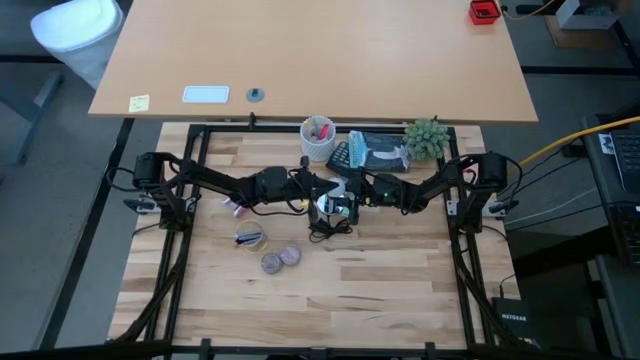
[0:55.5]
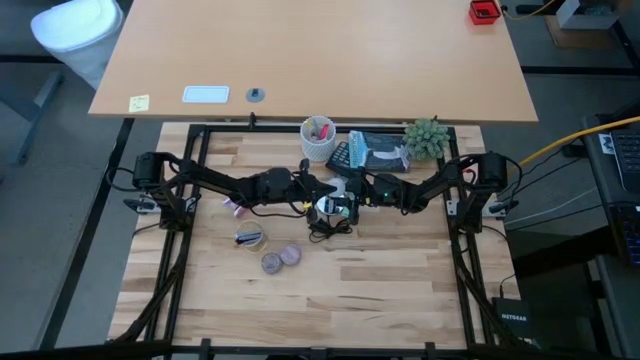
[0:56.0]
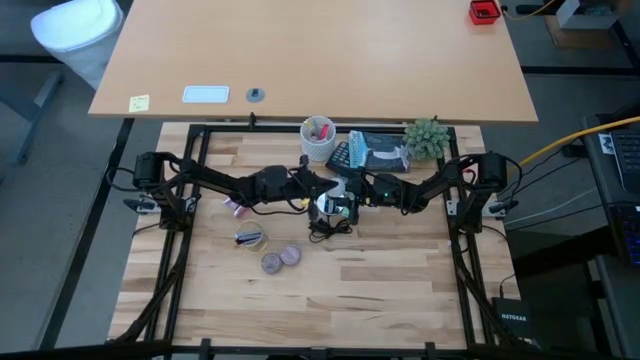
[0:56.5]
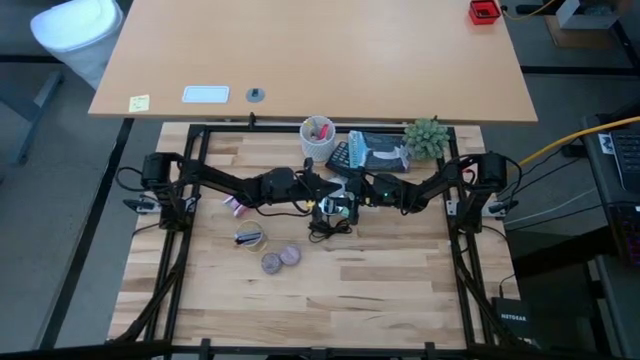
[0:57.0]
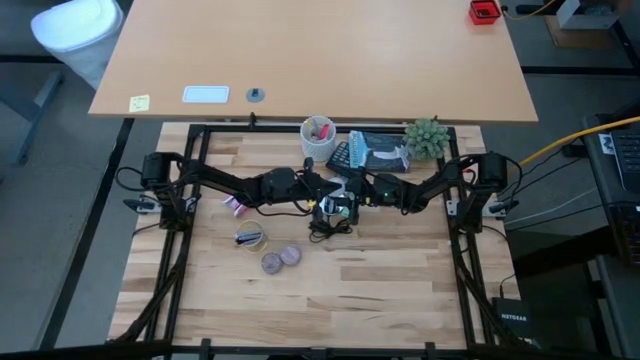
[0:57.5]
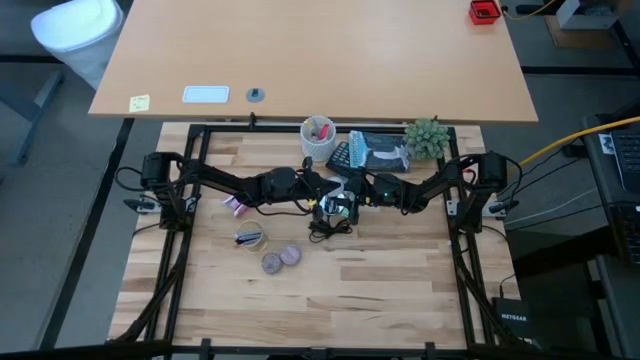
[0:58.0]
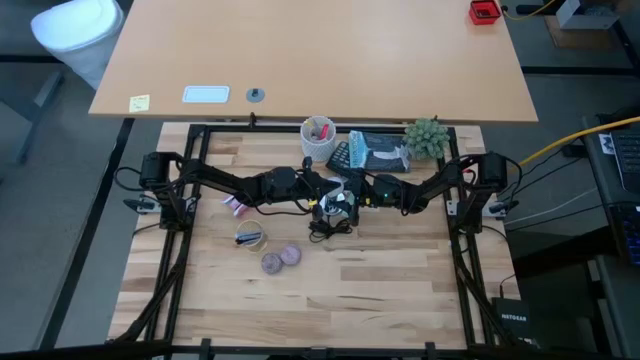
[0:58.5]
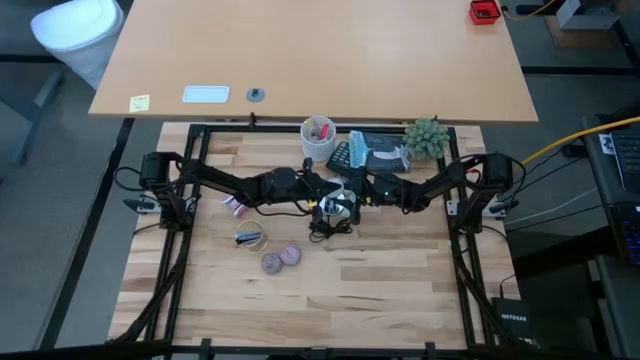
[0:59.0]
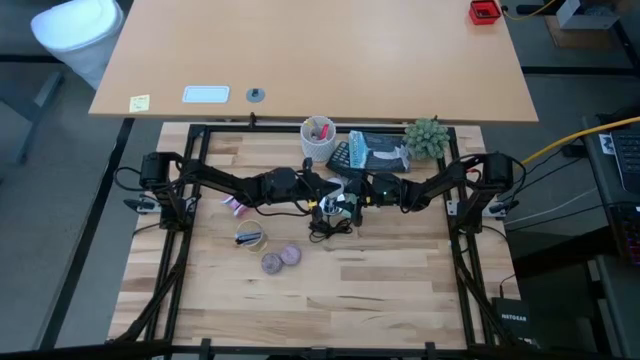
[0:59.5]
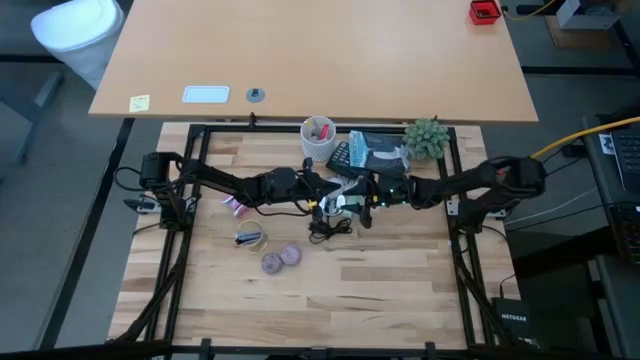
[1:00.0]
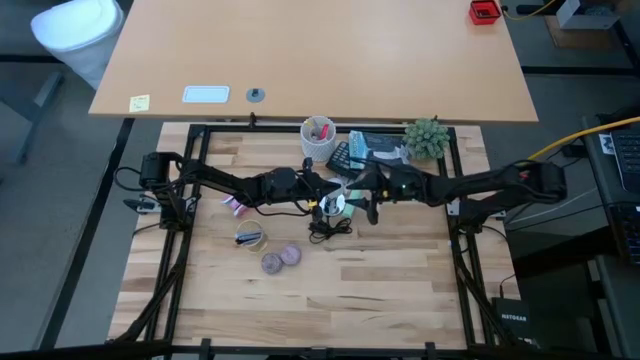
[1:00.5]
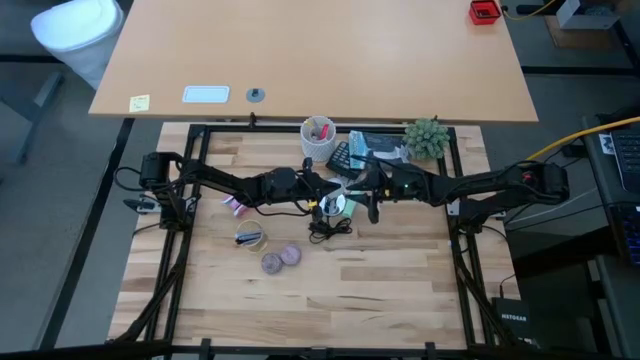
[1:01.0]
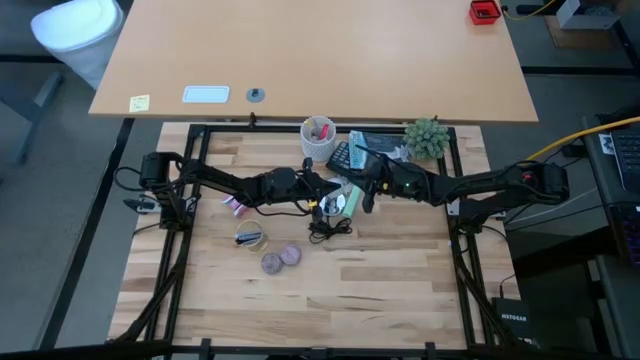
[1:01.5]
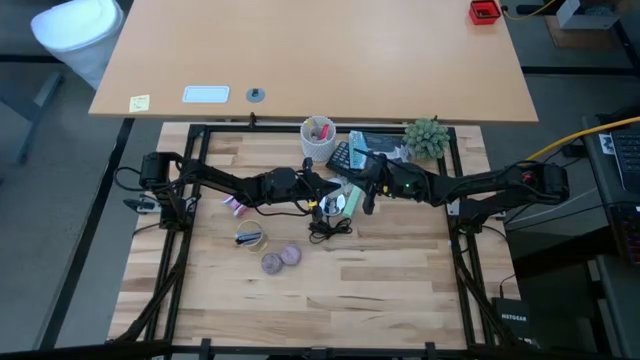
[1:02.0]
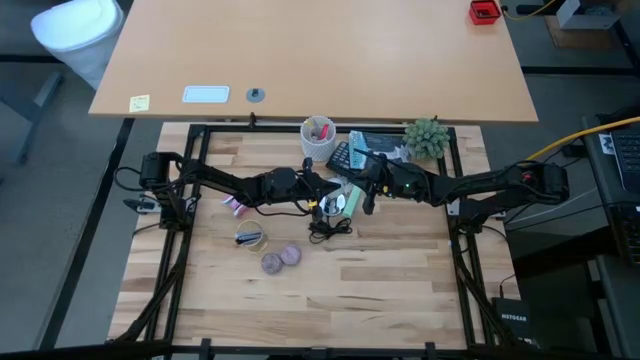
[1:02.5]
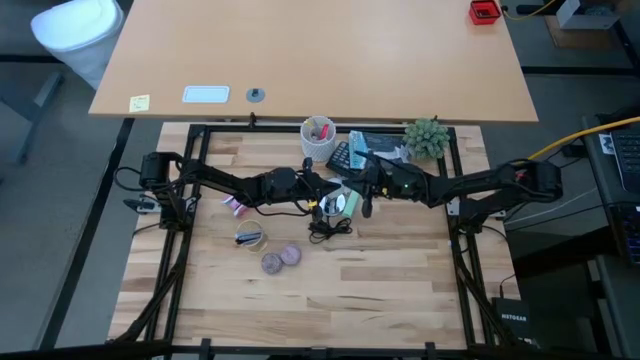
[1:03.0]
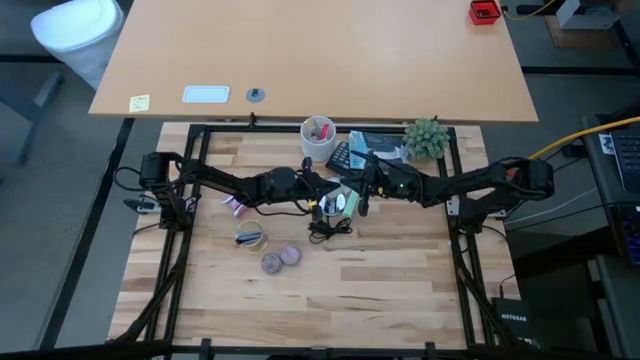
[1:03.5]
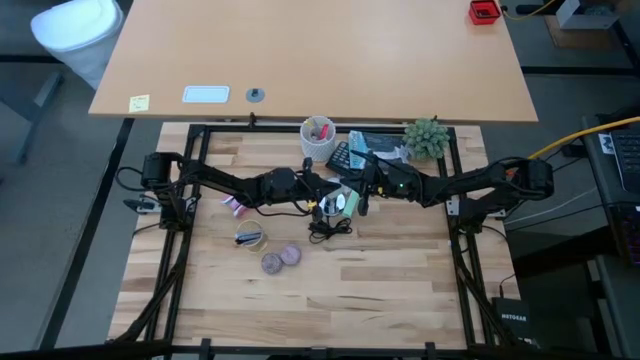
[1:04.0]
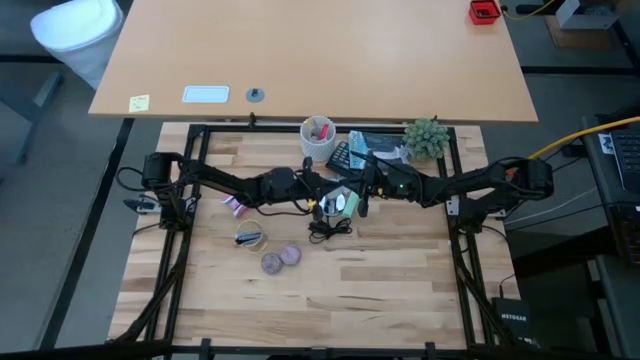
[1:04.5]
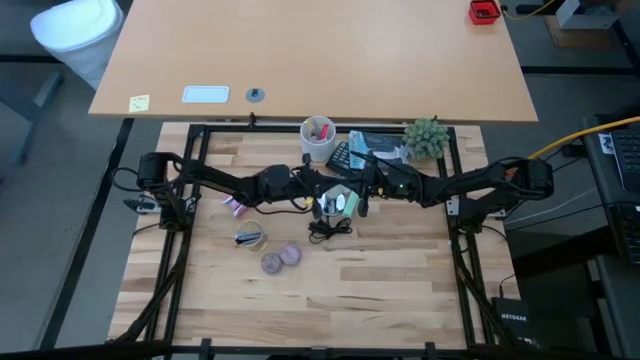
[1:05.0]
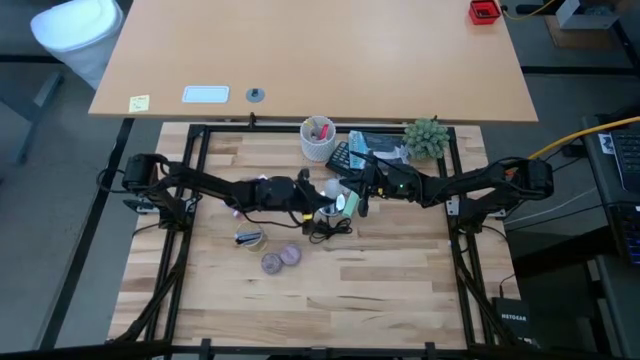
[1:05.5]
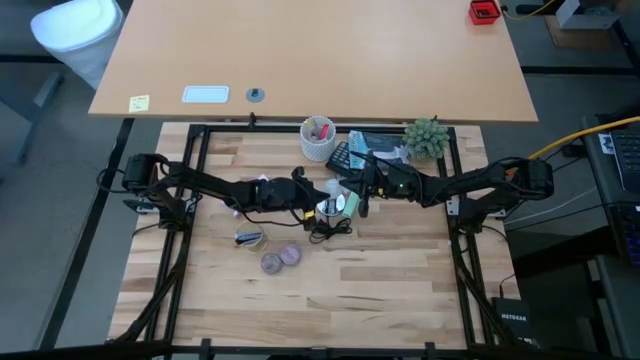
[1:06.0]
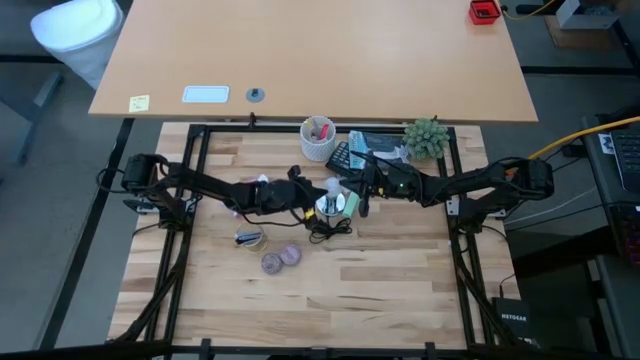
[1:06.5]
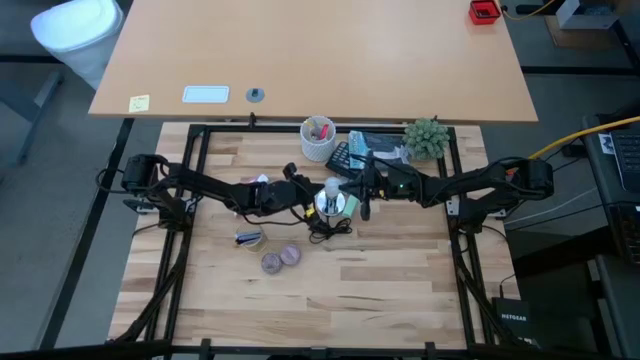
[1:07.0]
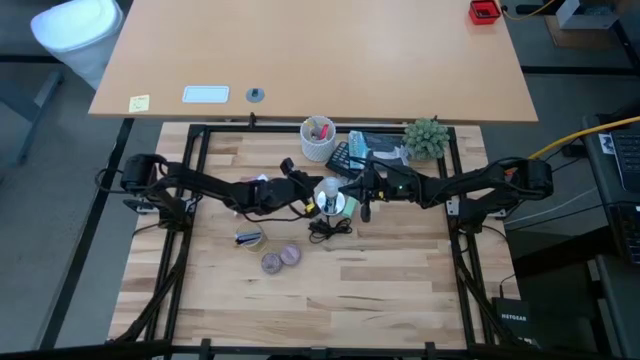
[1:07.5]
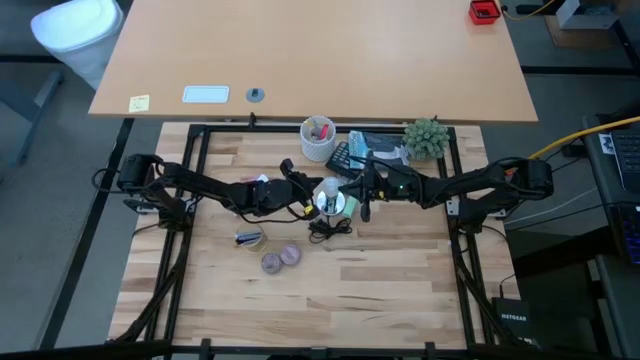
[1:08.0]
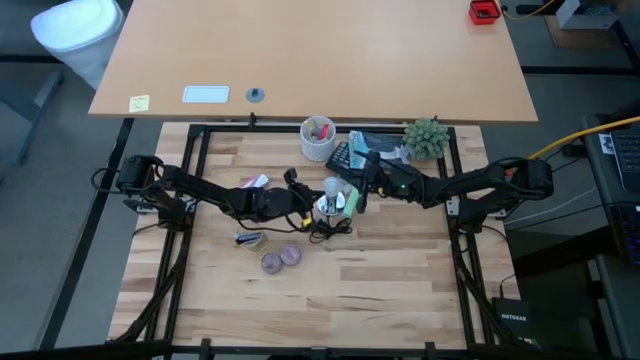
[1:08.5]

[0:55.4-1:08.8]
Task: Screw lightbulb
Insert the white lightbulb into the silver lamp
